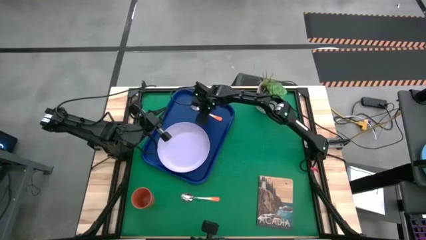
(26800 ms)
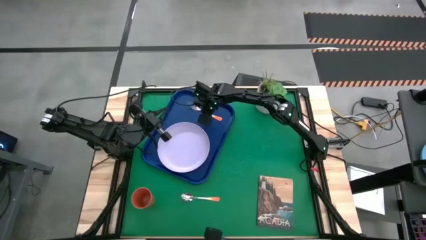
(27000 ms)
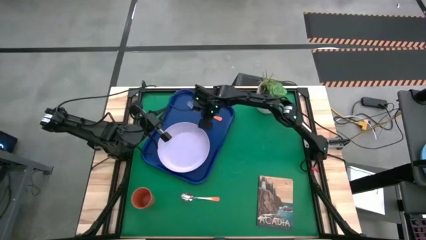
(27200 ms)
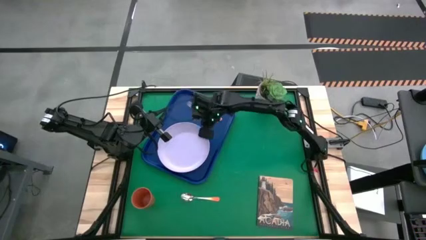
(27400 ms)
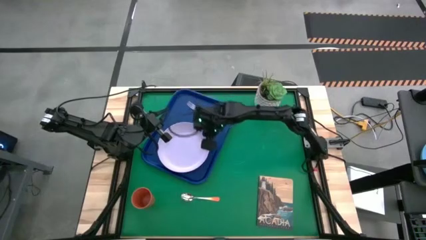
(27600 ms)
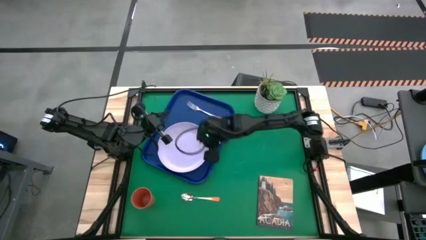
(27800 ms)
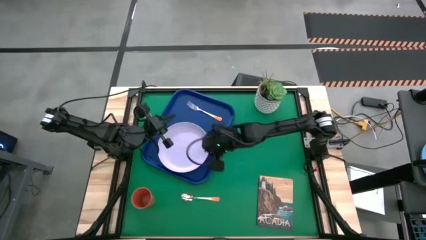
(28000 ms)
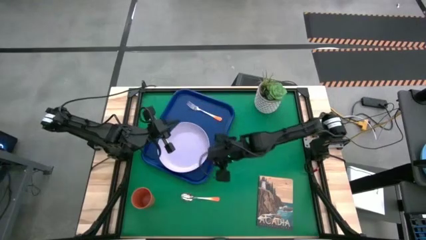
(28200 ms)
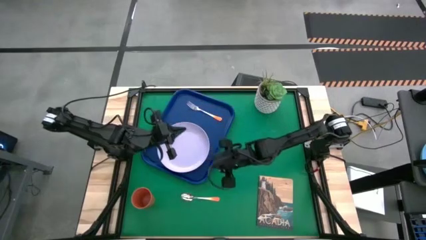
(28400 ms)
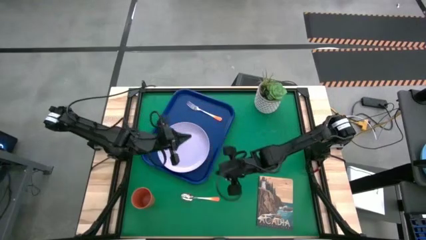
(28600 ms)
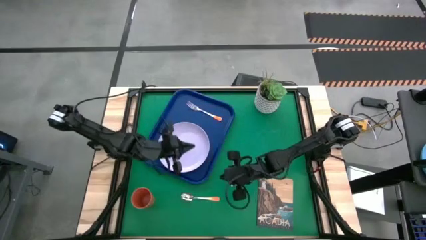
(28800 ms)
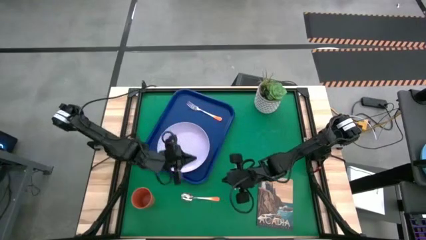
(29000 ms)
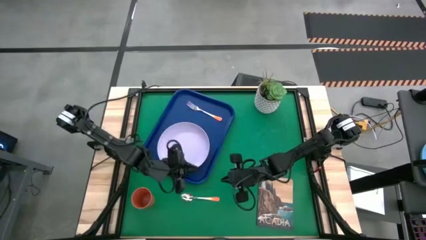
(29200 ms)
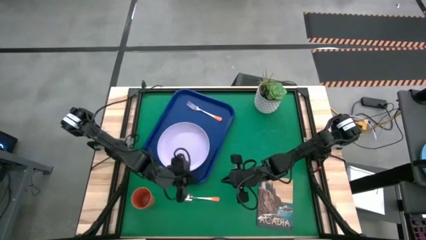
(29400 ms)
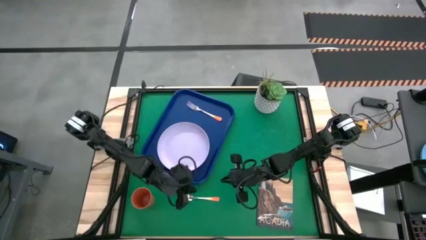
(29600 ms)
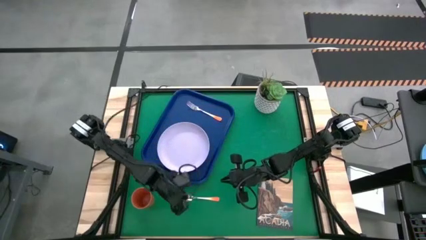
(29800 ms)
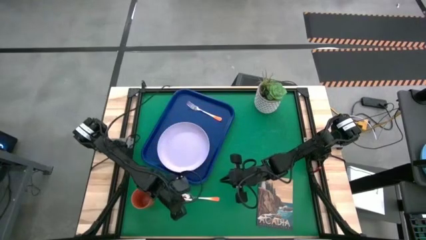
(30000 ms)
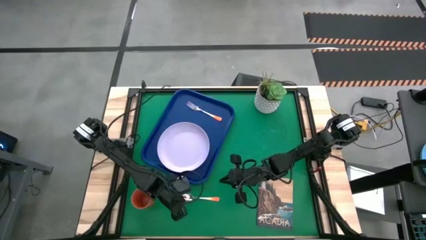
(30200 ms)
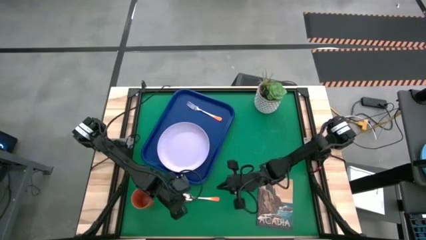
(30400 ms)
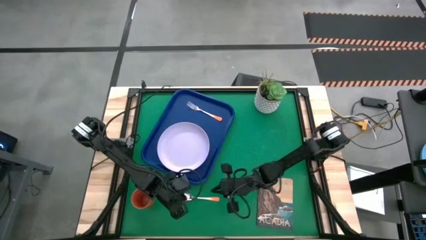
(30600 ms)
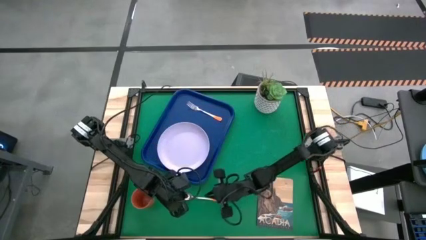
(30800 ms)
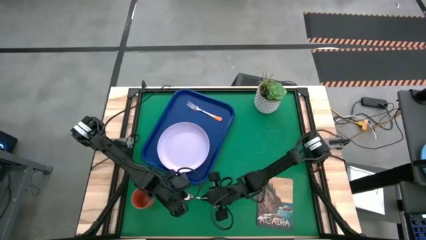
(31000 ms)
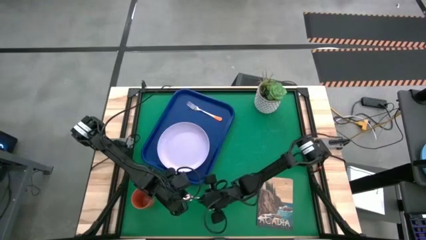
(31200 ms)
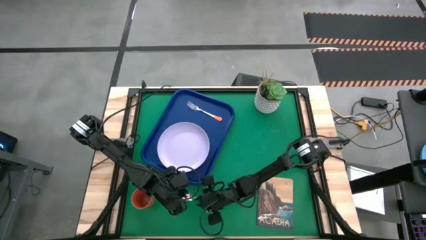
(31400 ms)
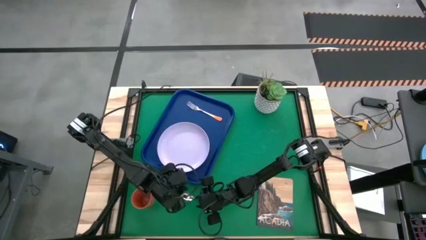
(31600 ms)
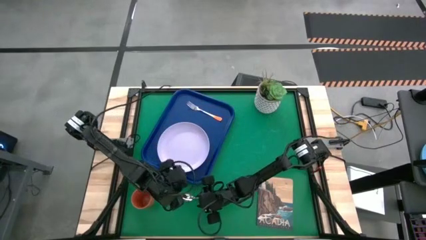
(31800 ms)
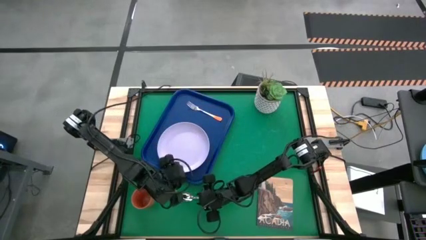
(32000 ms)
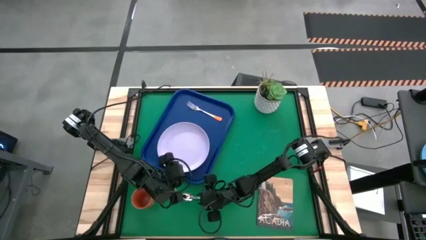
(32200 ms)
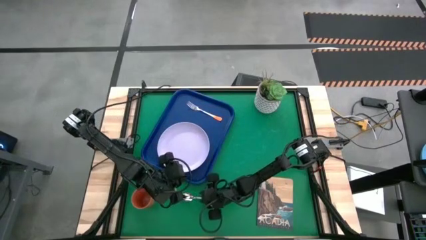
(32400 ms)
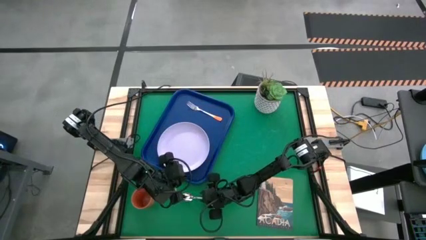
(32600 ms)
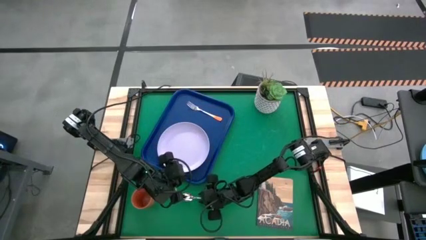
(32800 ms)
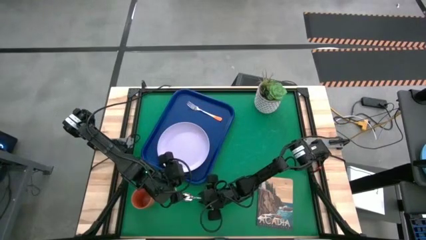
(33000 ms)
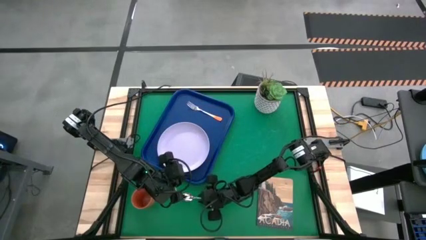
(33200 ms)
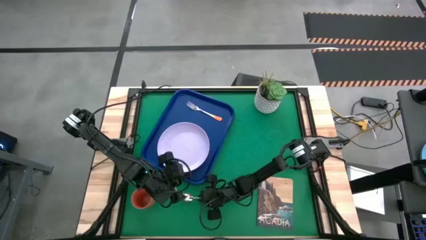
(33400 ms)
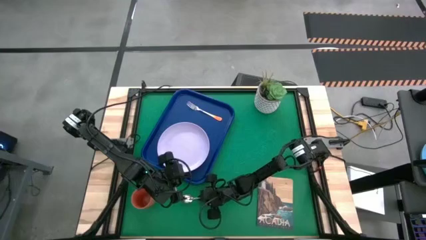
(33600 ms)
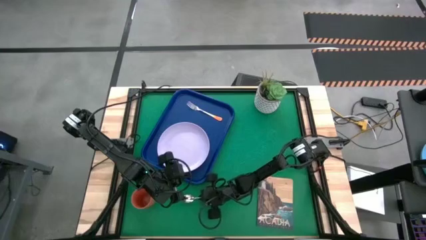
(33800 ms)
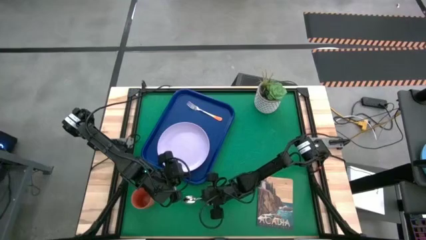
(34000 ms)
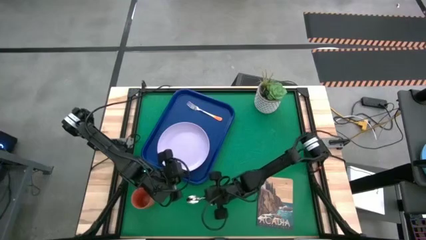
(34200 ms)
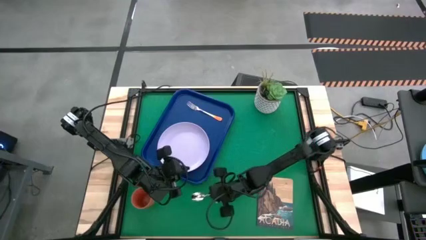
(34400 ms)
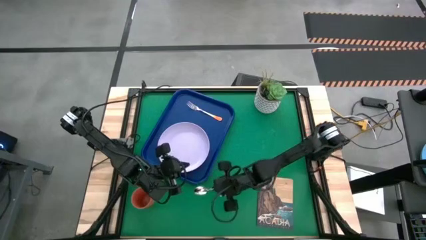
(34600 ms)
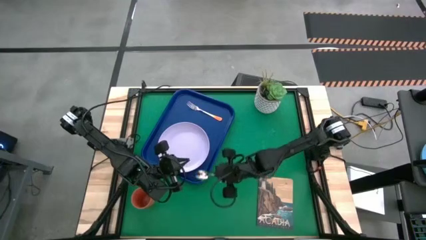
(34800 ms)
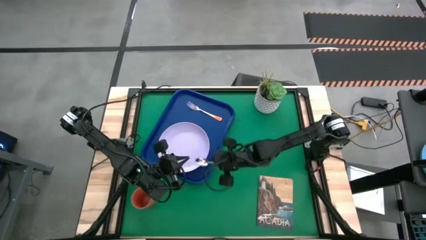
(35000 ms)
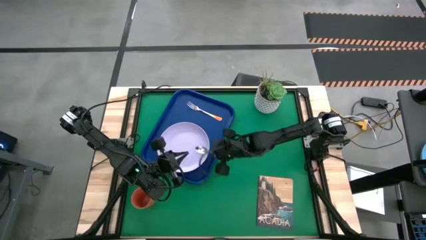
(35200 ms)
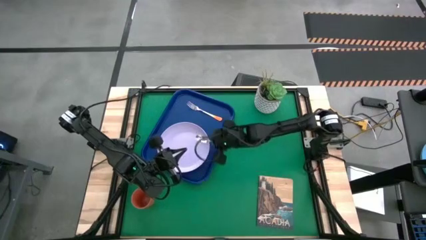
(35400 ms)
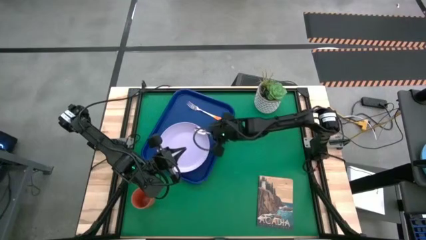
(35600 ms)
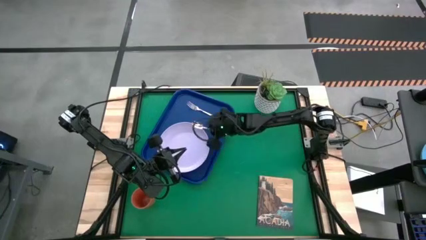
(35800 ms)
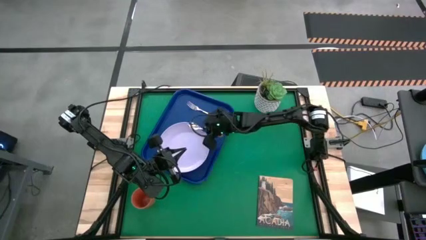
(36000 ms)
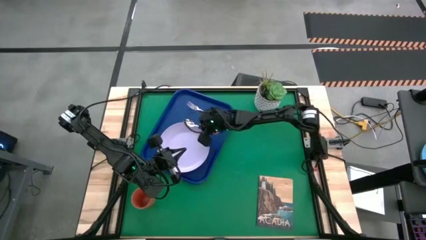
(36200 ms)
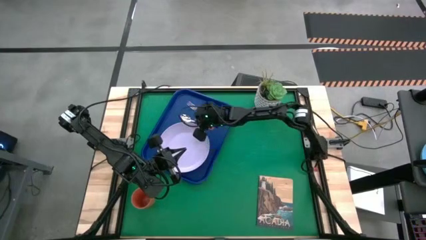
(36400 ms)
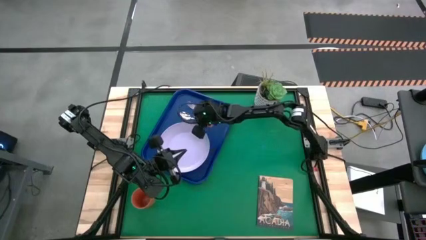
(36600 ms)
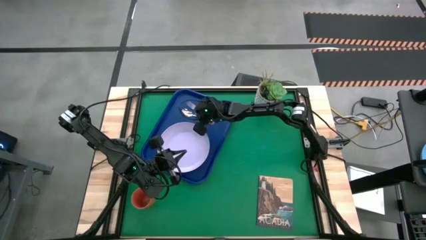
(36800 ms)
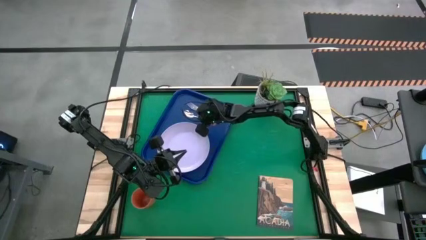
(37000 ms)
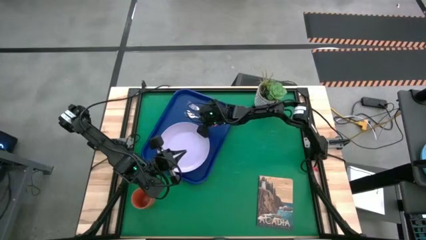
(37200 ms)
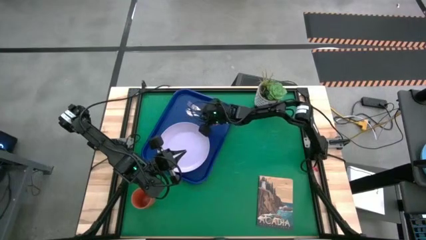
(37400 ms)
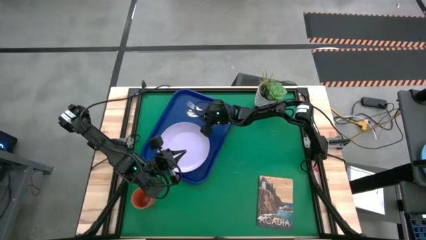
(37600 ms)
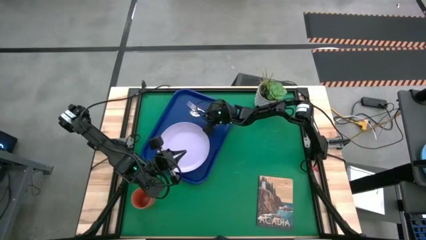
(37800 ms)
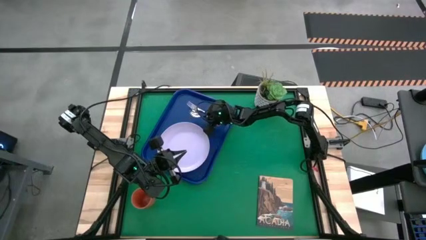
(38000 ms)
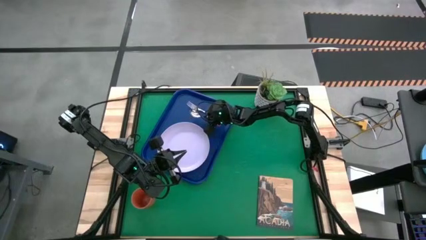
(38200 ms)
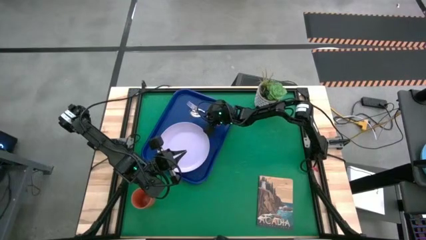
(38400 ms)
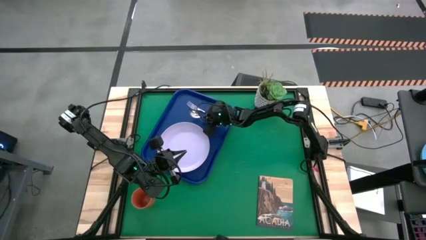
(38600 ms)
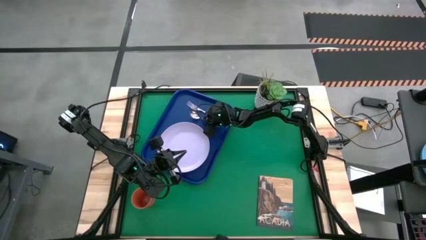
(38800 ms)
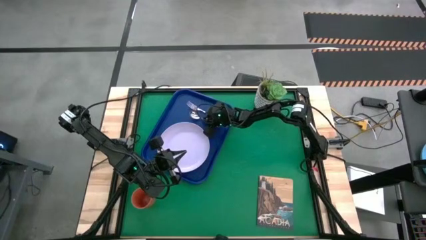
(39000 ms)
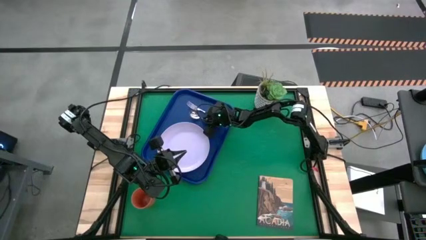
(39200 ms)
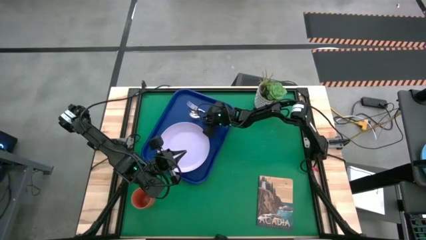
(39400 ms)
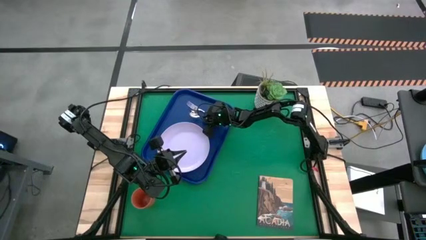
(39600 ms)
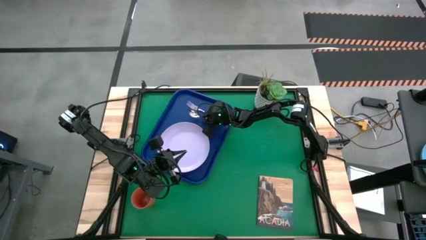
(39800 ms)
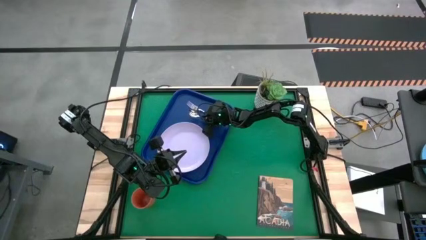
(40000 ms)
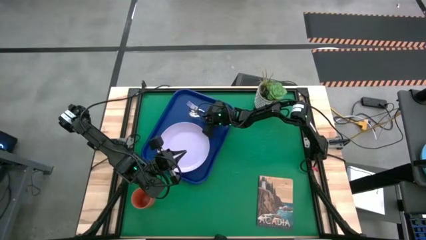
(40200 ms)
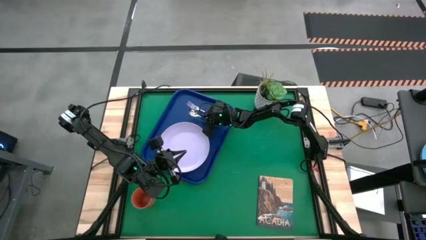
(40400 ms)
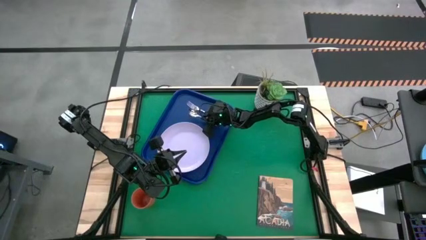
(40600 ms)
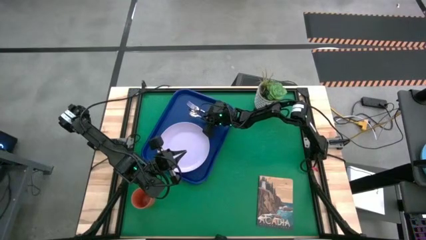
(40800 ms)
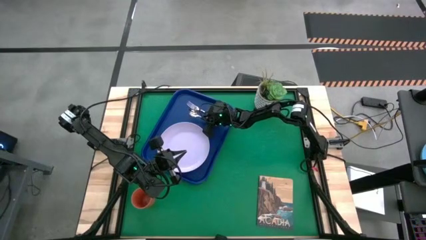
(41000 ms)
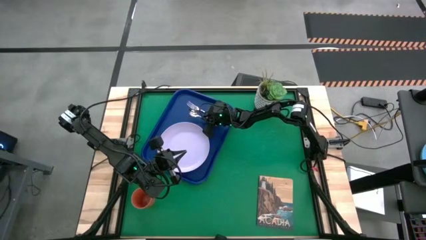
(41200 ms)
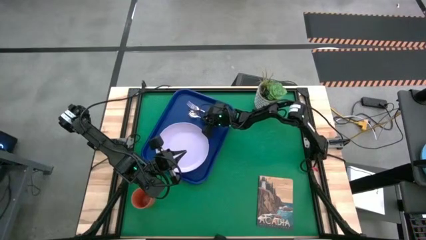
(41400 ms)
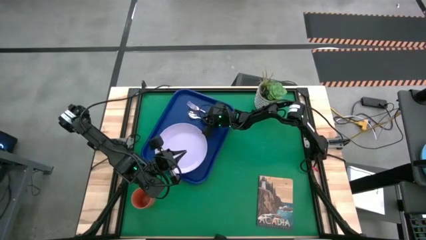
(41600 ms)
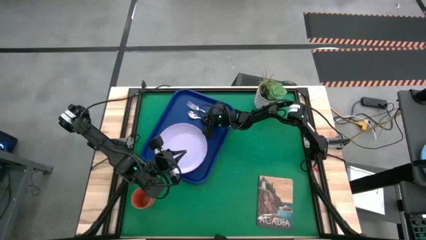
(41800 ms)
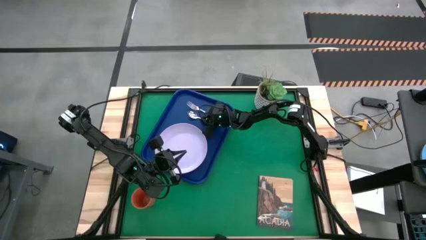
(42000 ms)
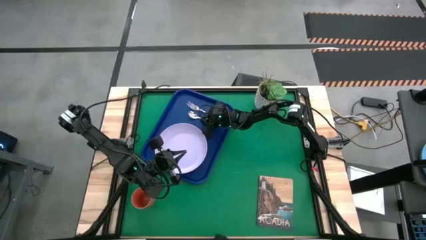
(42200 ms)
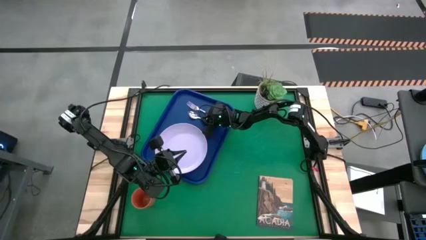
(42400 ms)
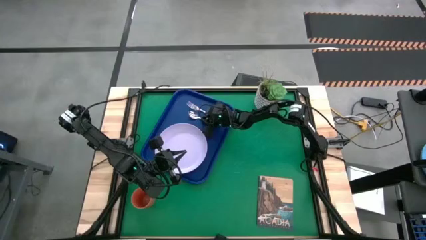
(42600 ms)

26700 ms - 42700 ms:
Task: Pick and place plate/cup/fork/spoon on tray
Put the orange spoon on the blue tray between the white plate and the orange fork

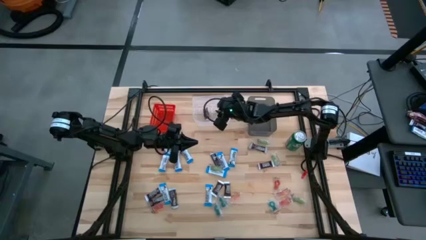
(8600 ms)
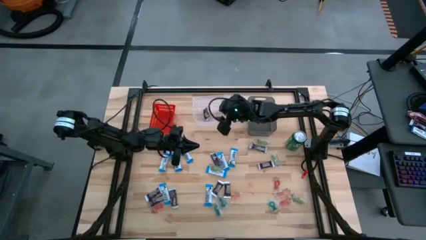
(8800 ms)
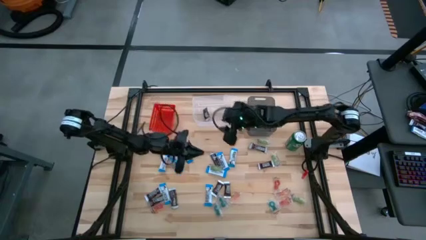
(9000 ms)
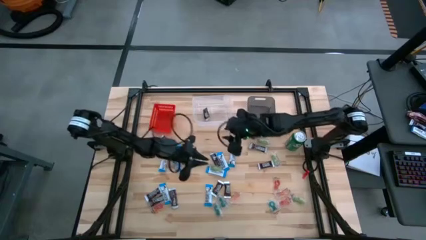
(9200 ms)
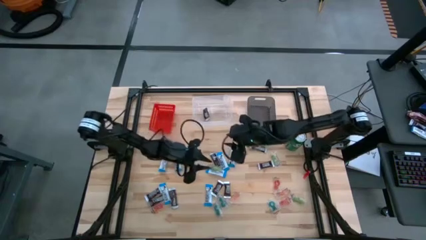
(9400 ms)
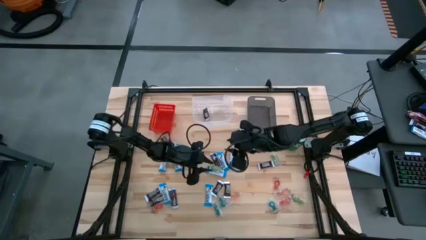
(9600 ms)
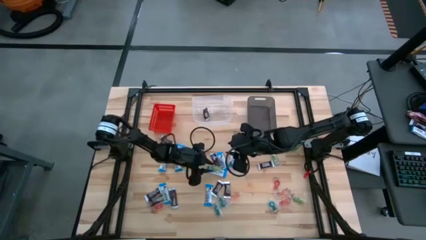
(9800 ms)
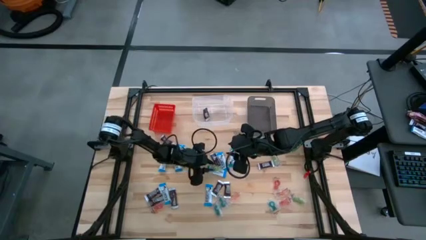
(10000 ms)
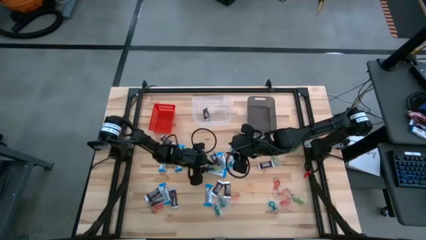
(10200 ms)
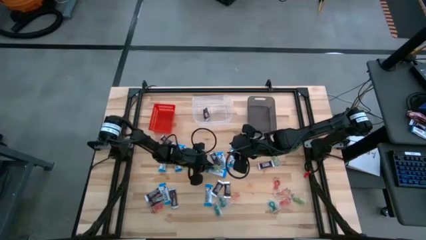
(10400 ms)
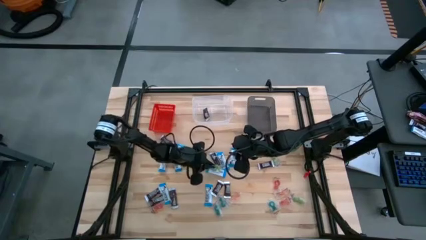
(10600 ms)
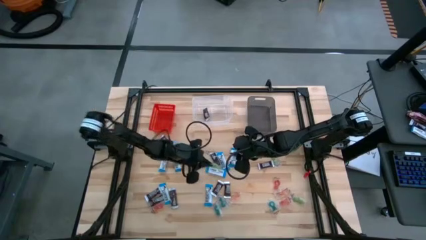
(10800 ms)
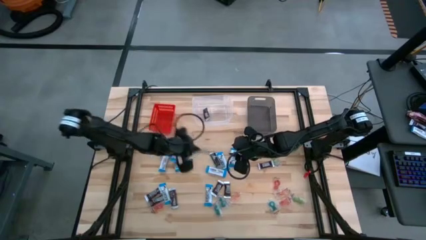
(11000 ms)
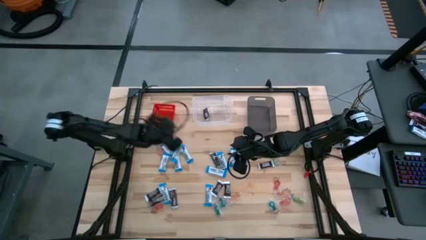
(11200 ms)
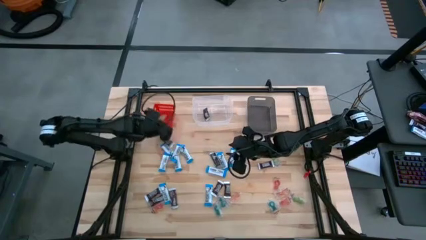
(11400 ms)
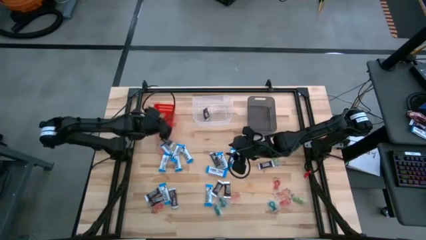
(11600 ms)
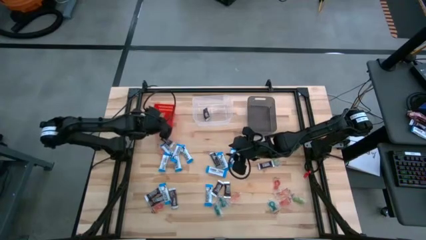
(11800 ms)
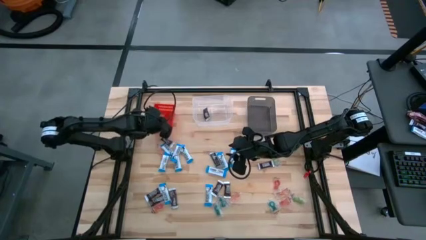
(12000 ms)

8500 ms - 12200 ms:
Task: Sort candy
Put the green candy into the red bin
